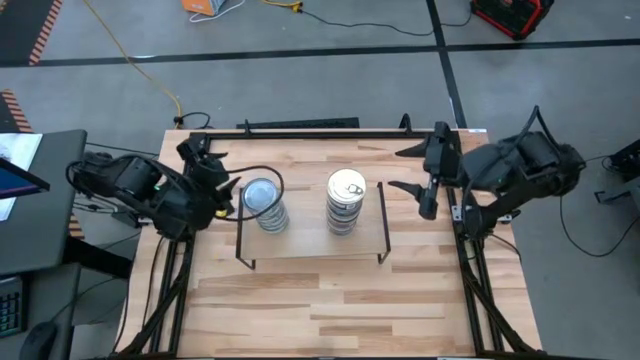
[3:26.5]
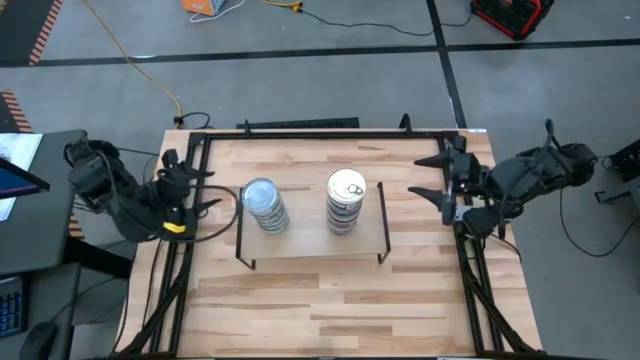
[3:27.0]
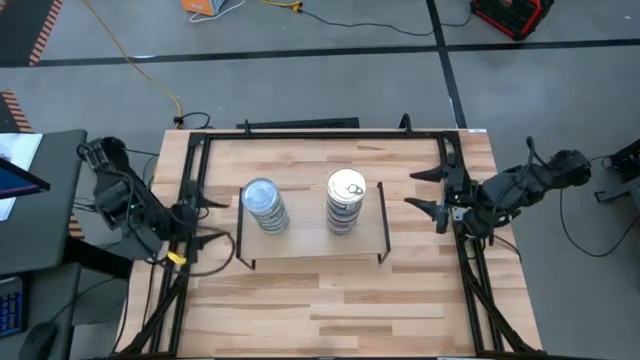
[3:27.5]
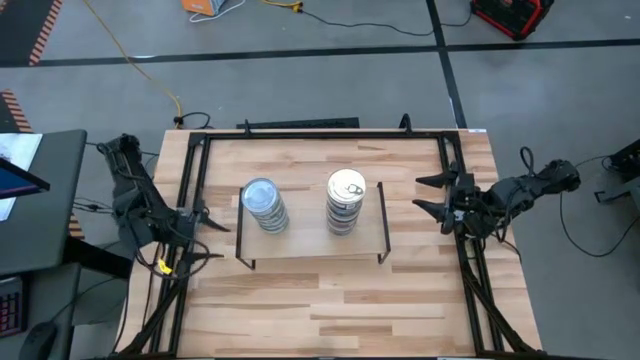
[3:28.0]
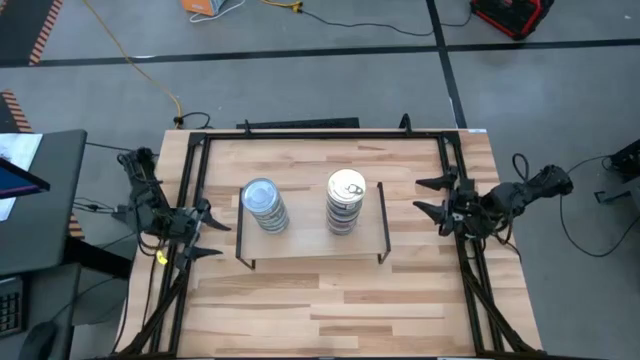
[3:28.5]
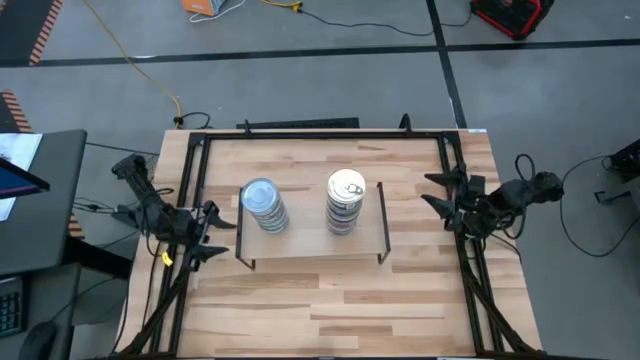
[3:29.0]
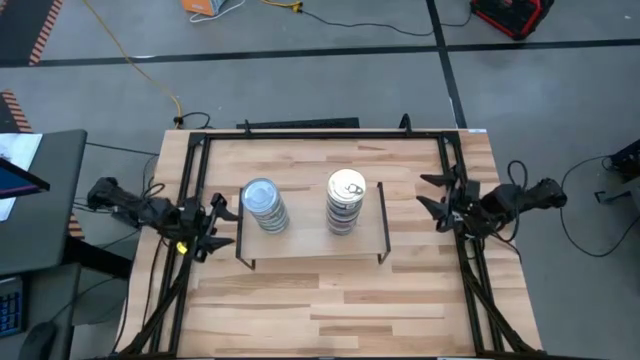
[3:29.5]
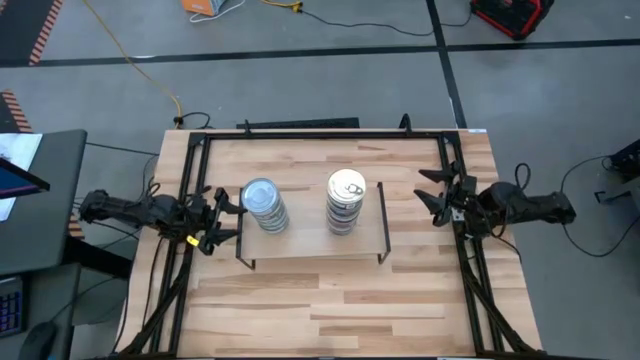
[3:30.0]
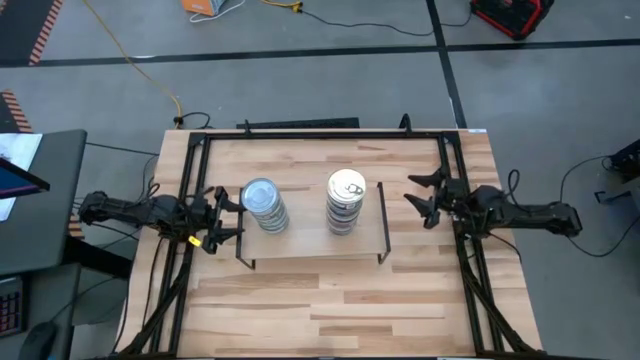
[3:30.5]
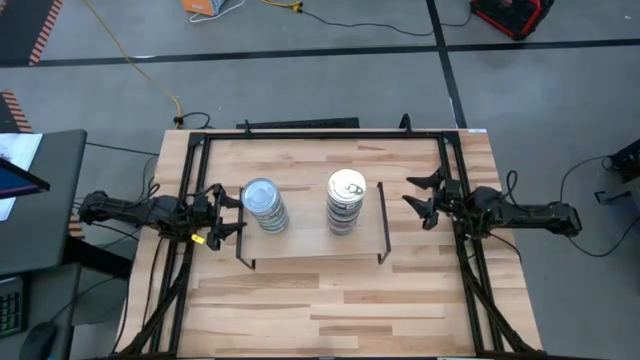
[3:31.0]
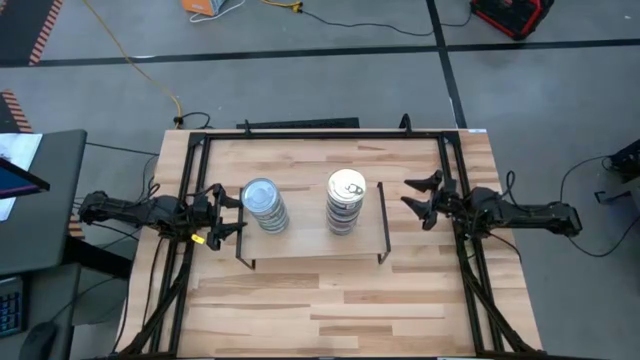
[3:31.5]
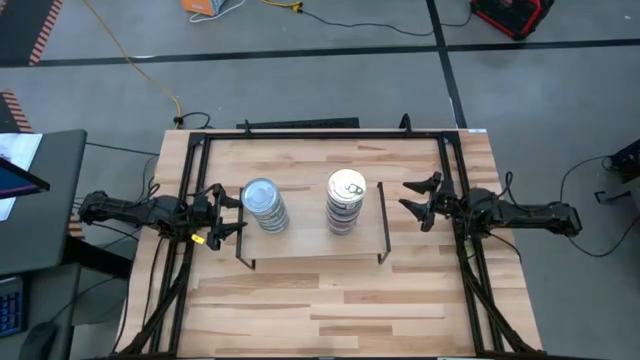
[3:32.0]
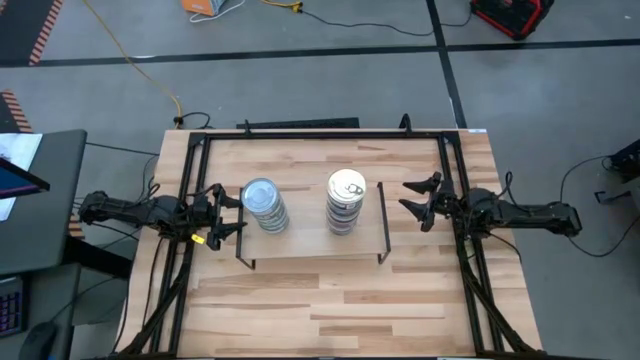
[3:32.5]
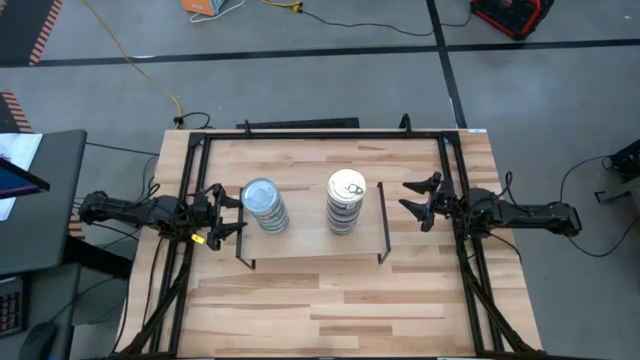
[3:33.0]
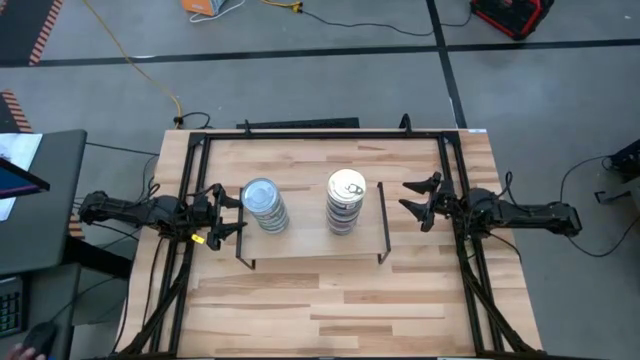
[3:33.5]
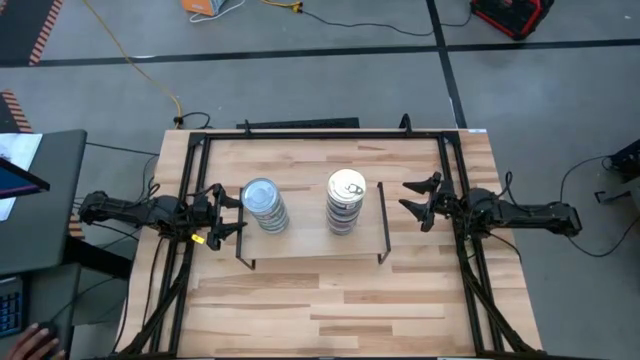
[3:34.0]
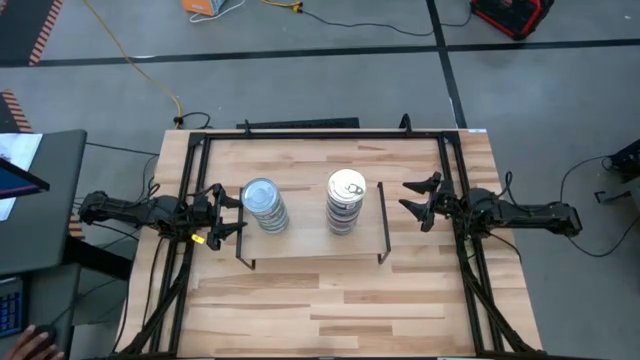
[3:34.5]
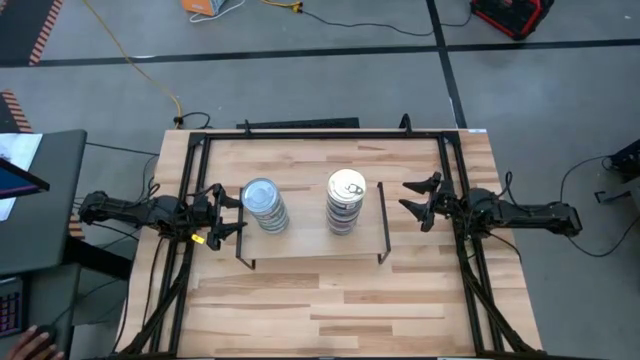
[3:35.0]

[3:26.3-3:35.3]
Task: Stack canned seafood by type on shelf
Return to Home Position

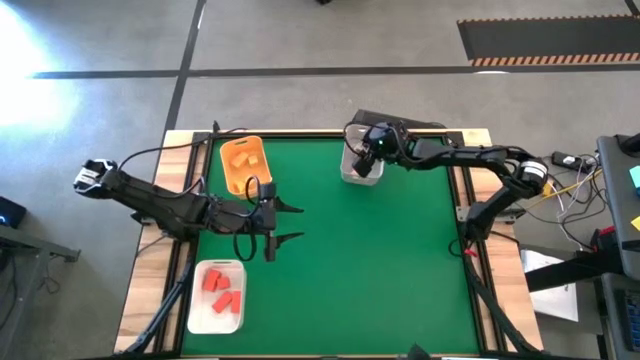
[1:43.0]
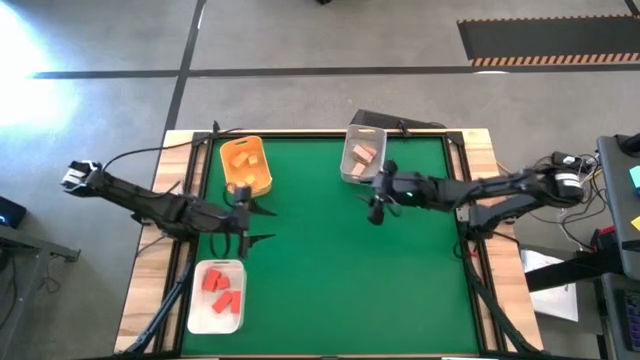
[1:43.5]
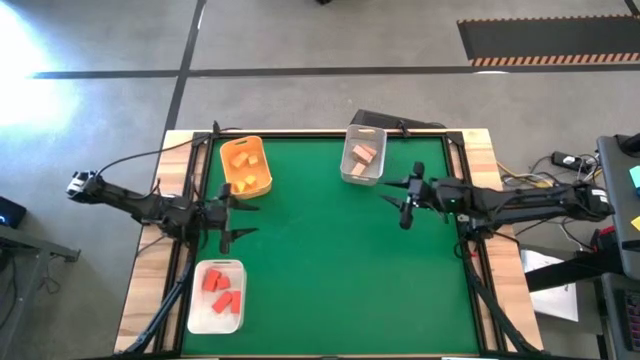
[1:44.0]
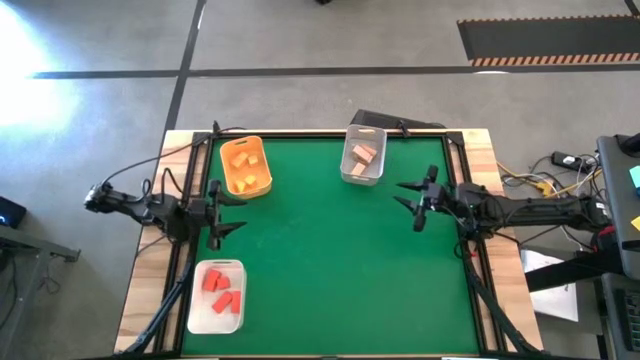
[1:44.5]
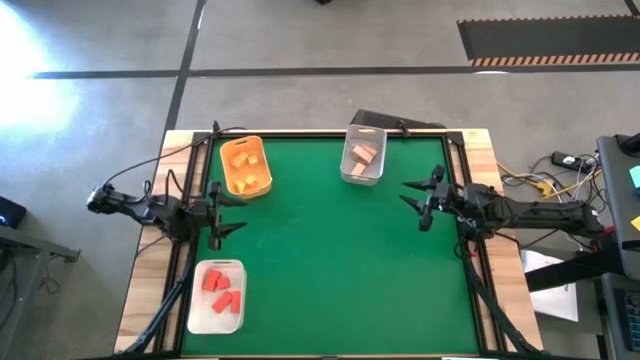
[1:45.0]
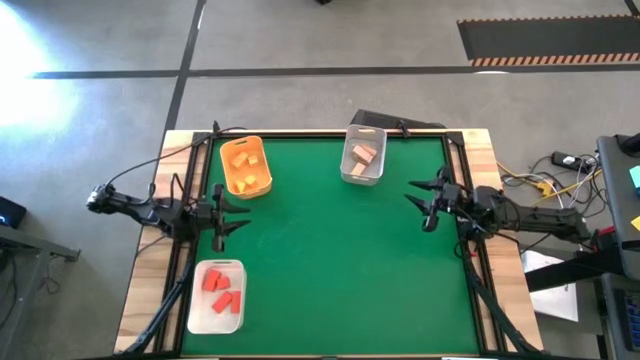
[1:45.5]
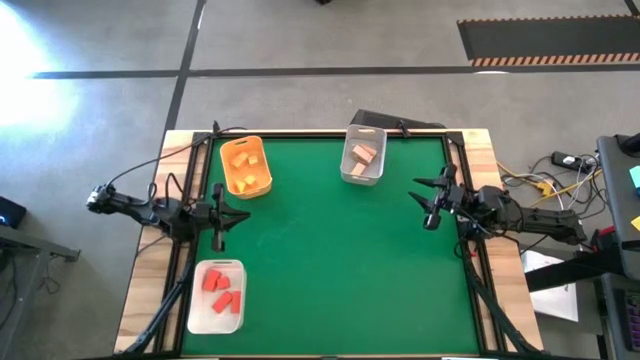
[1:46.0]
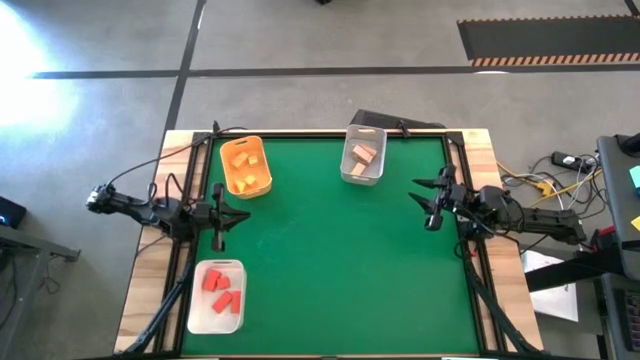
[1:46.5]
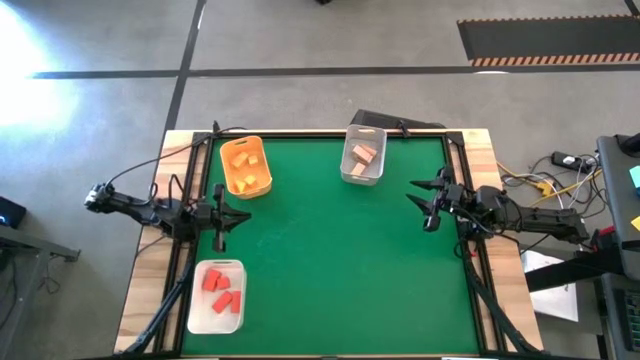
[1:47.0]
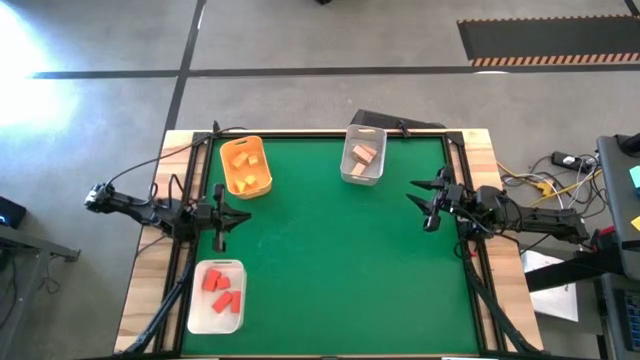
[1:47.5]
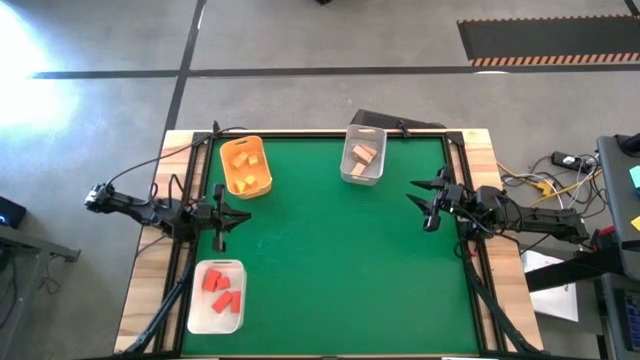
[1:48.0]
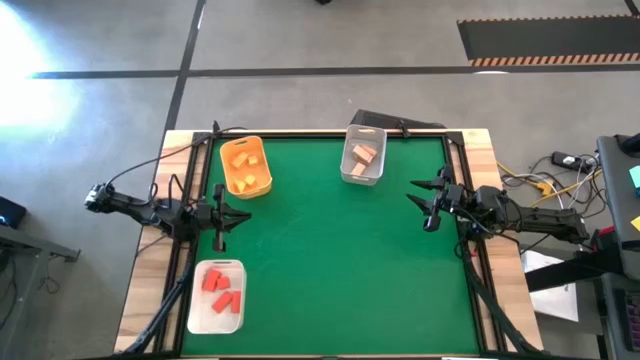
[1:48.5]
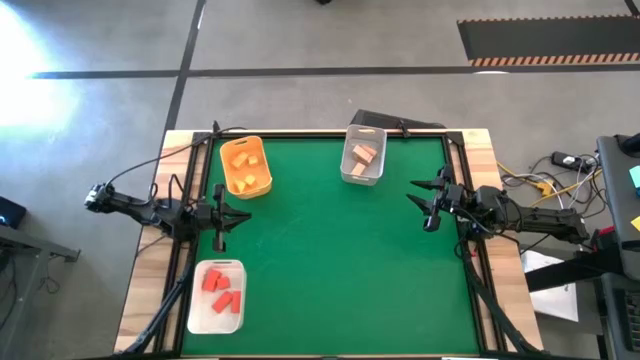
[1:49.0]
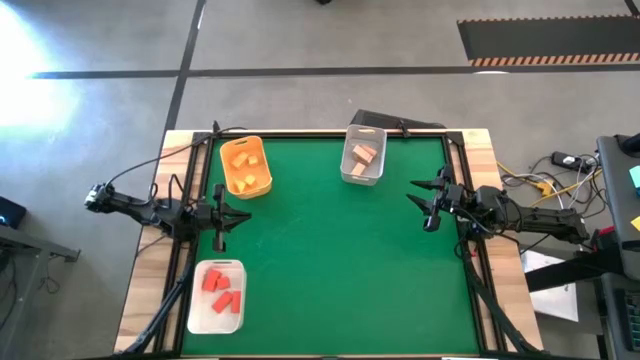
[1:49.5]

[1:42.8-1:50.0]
Task: Sort & place blocks by color
Return to Home Position

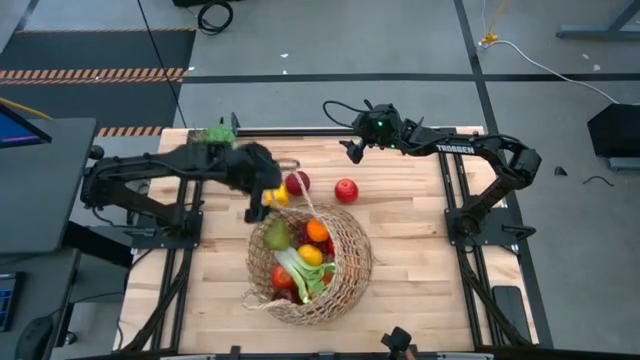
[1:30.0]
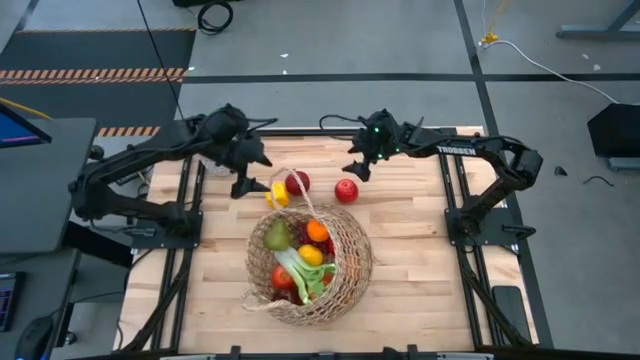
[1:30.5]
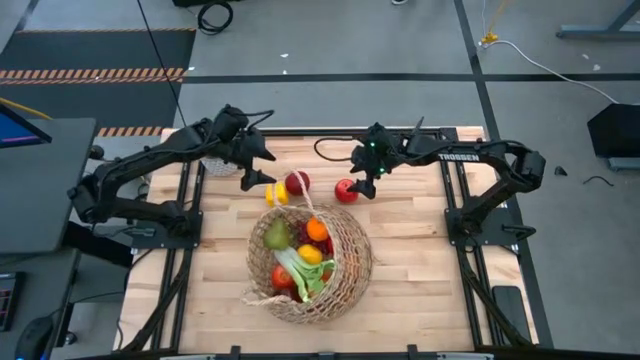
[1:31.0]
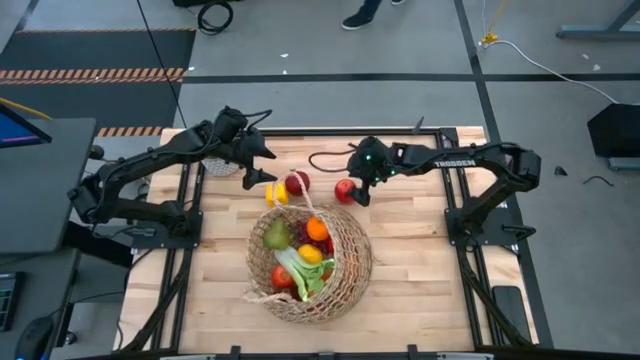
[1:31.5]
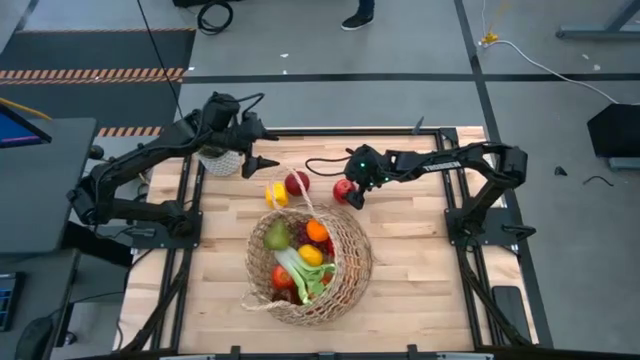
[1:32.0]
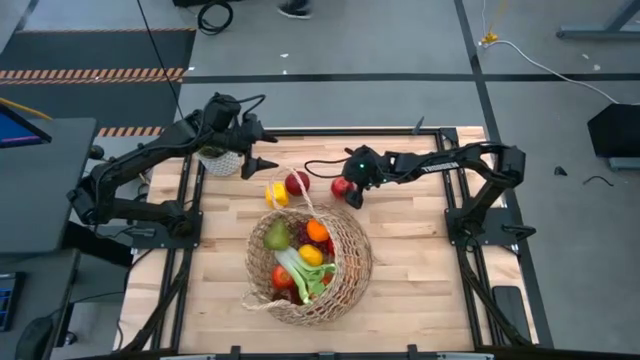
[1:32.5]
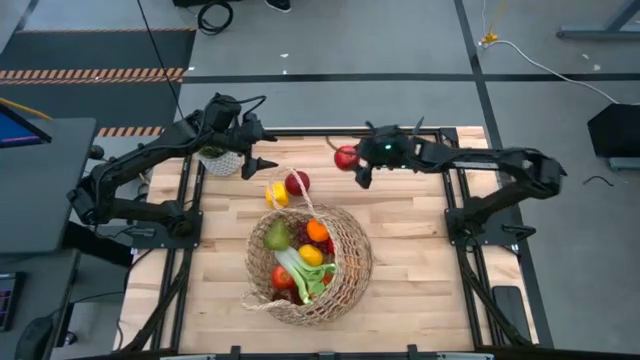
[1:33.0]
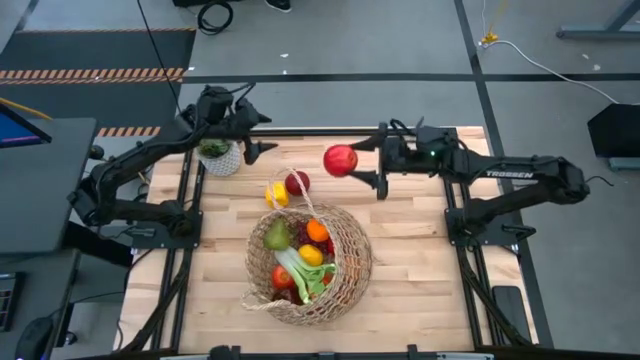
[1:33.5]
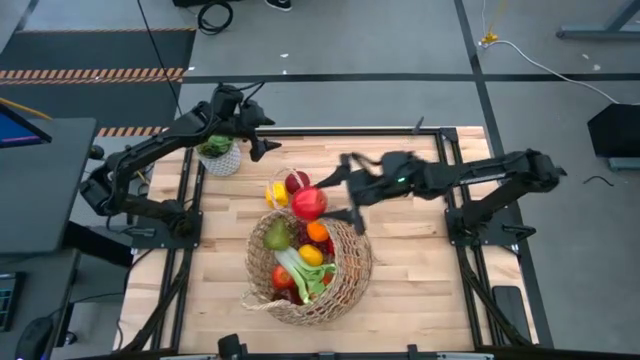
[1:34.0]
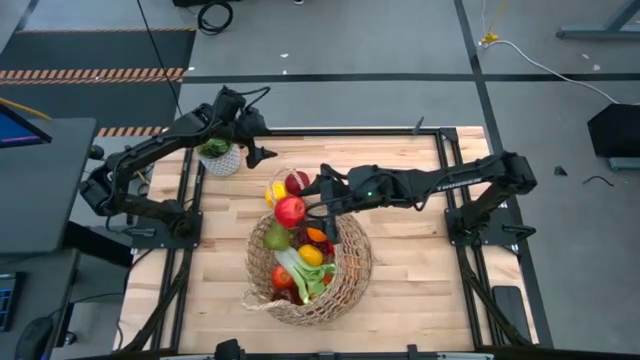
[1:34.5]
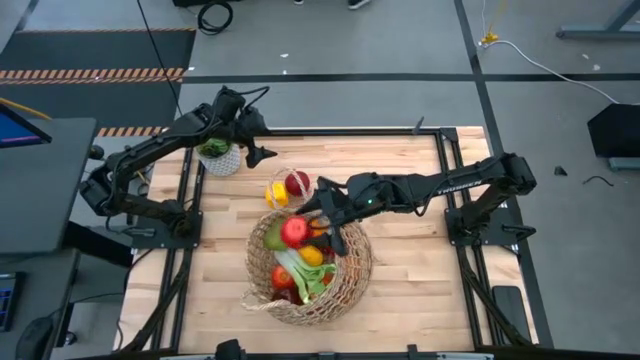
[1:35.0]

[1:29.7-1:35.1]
Task: Build produce basket
Put the apple into the basket
